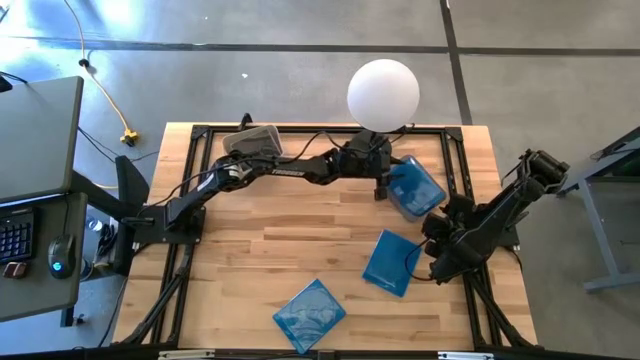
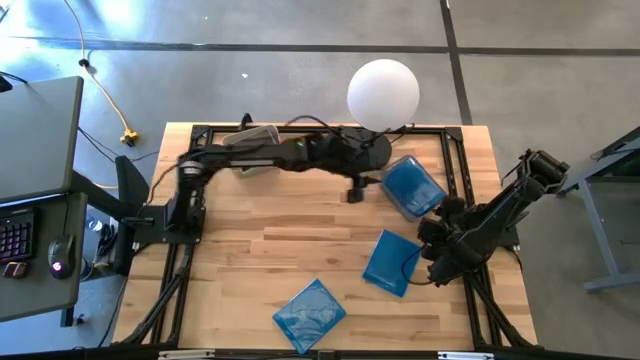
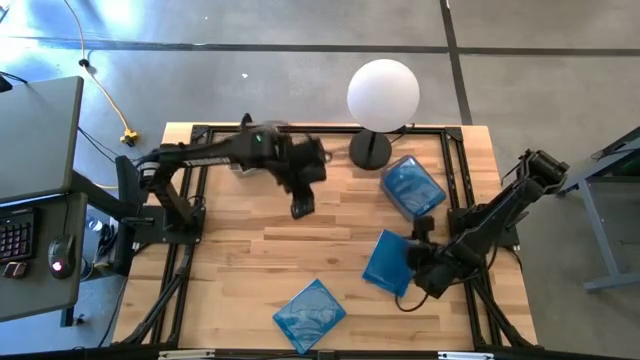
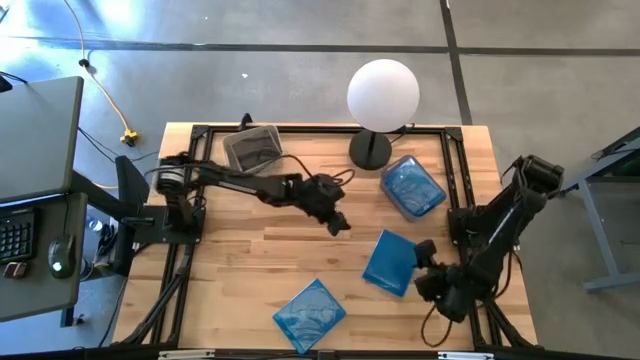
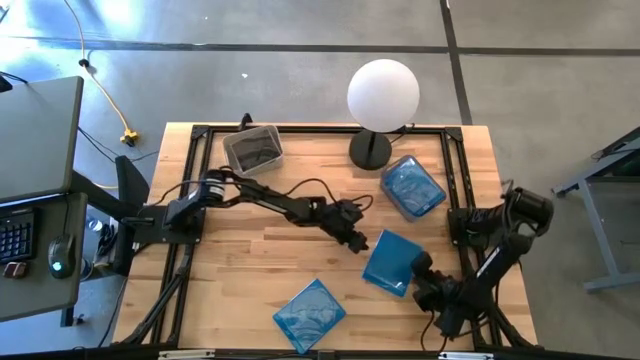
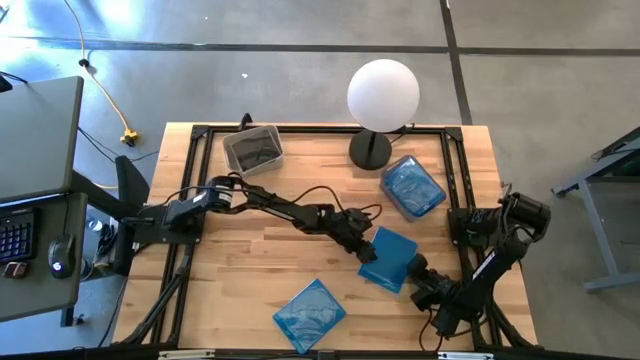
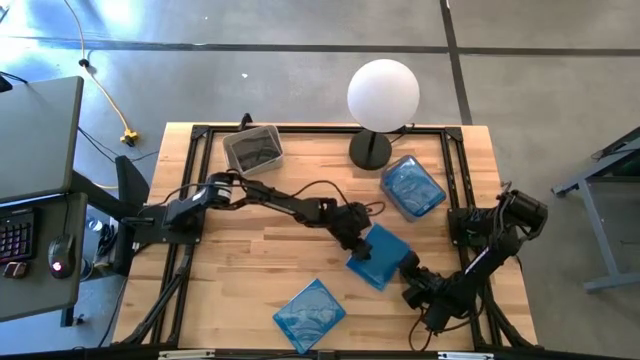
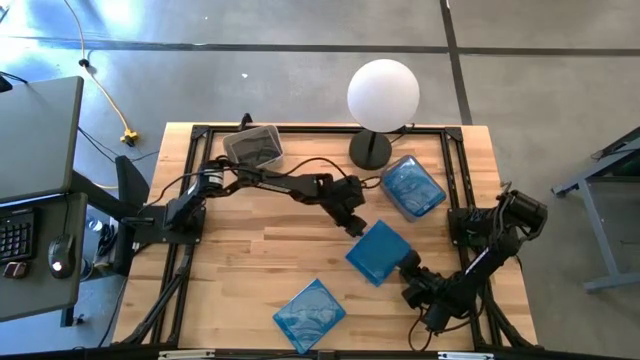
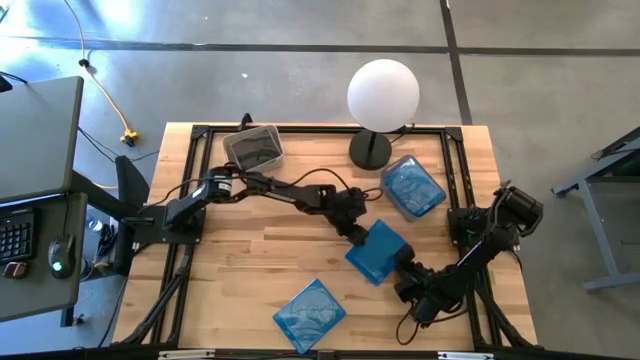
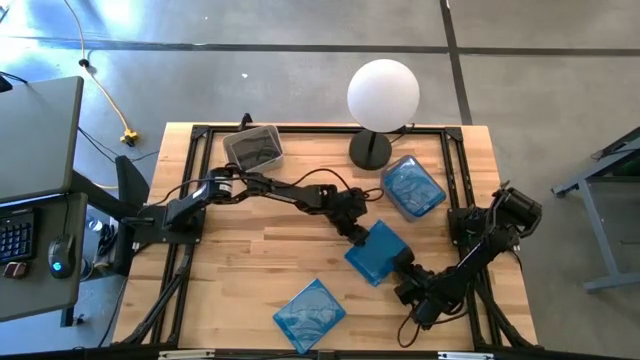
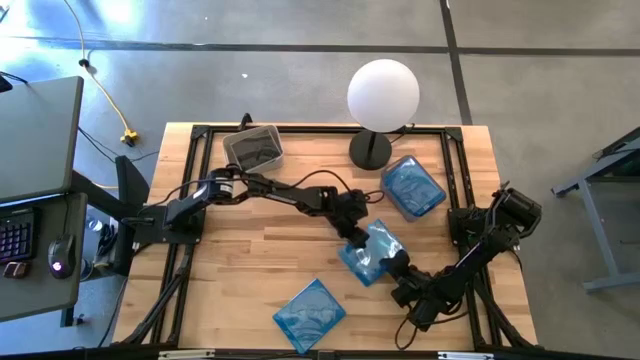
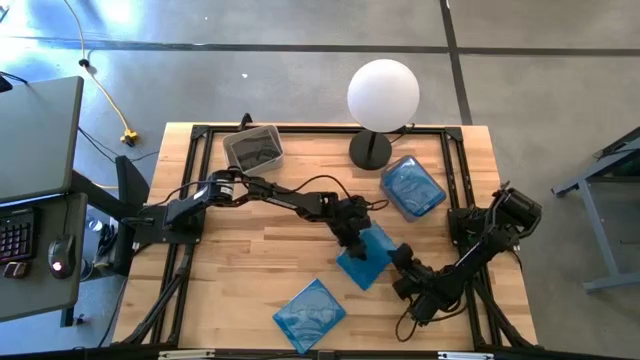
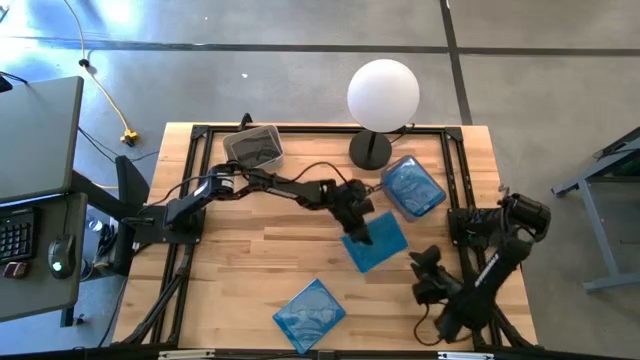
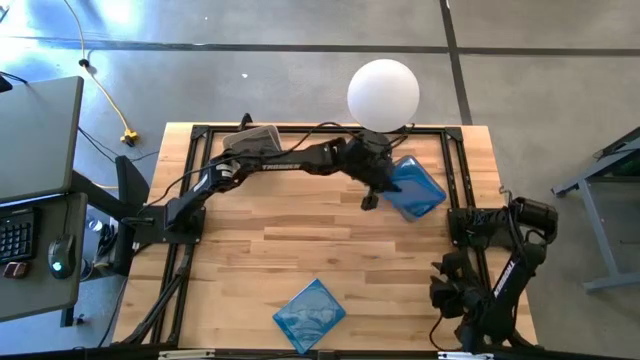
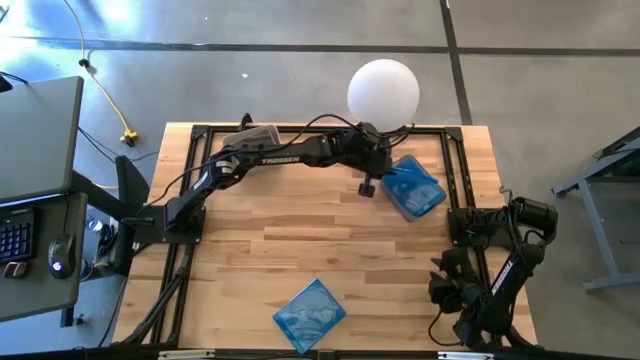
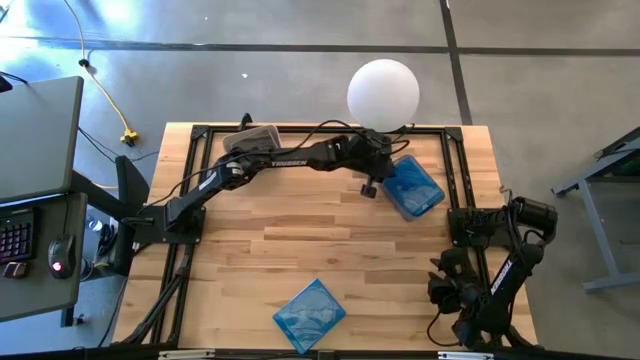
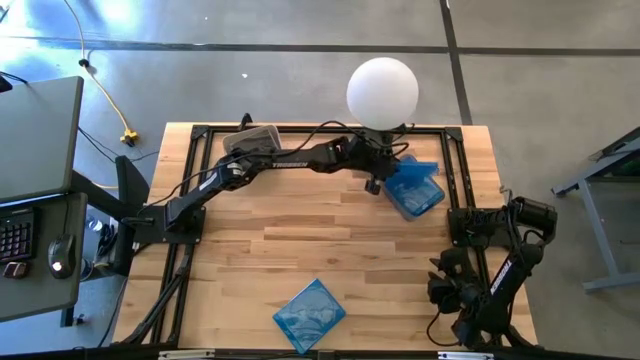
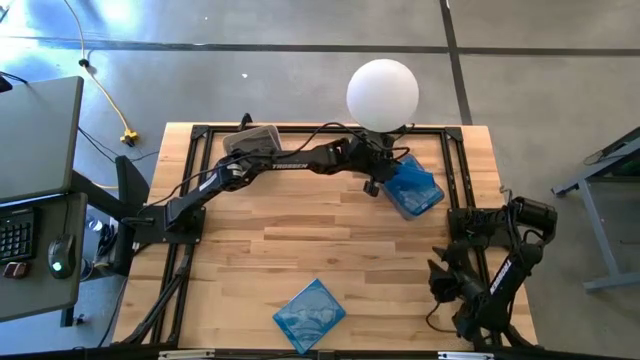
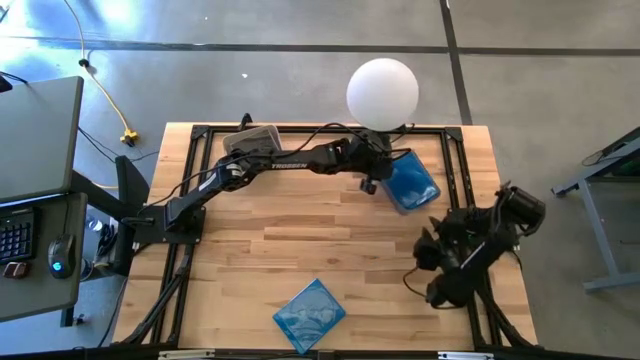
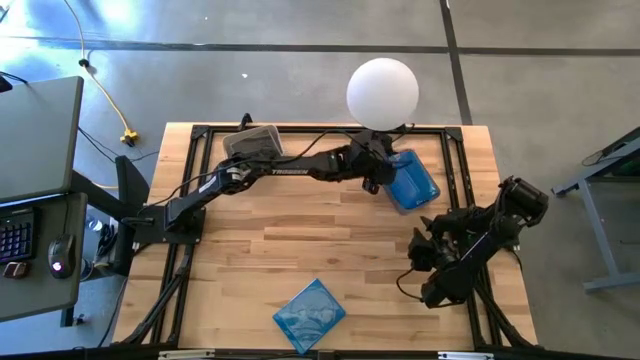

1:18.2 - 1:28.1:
Task: Pick & place jewel cases by type
Put the top blue CD case into the gray bin

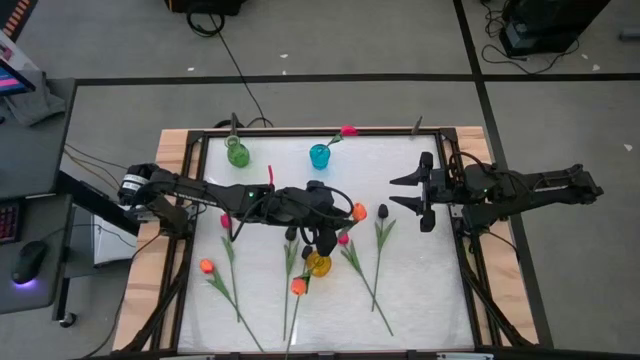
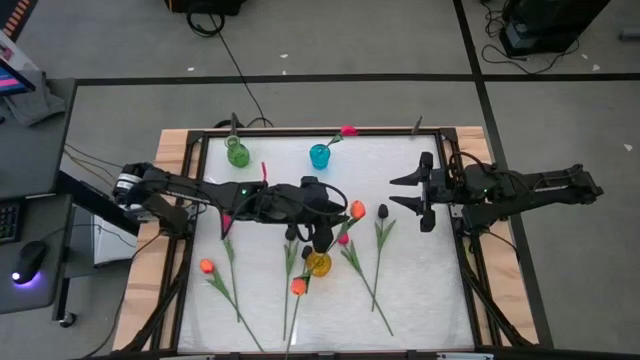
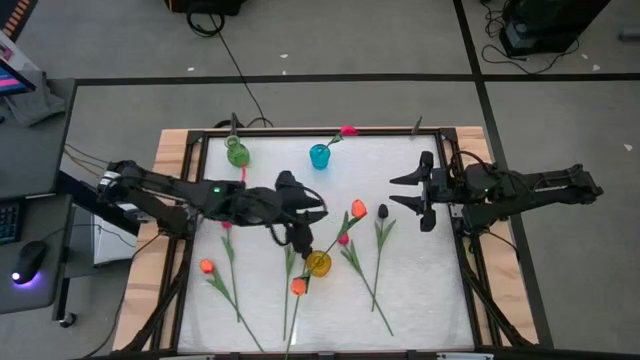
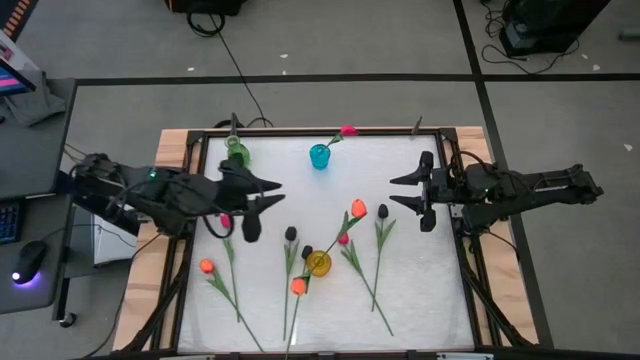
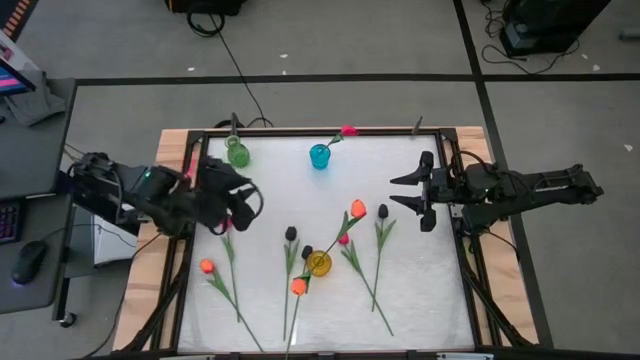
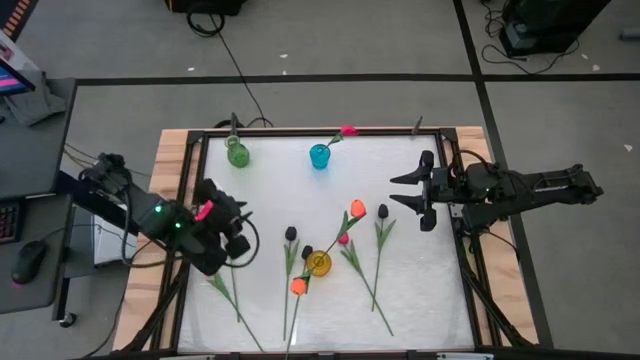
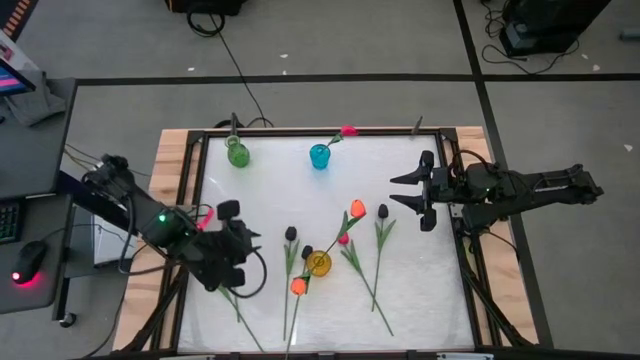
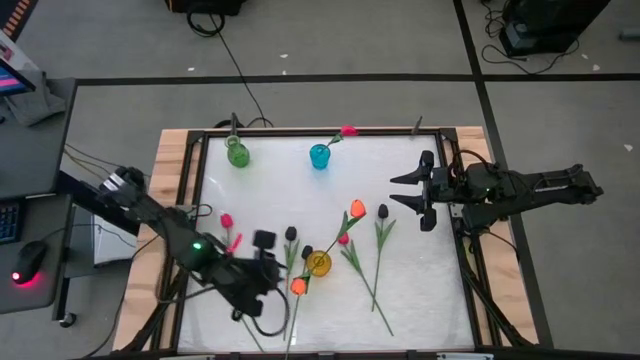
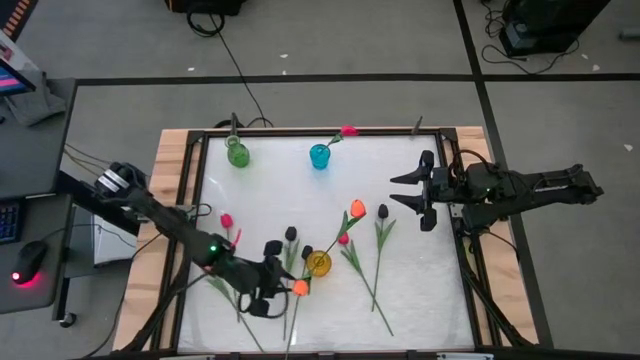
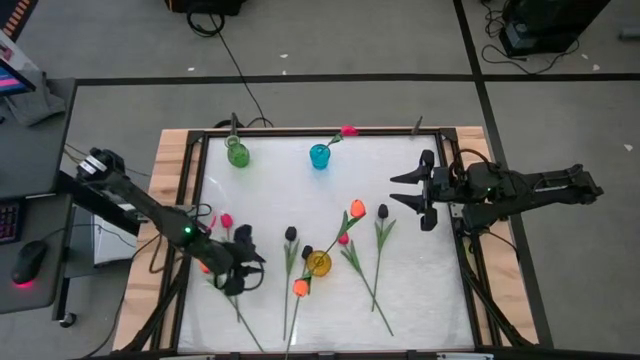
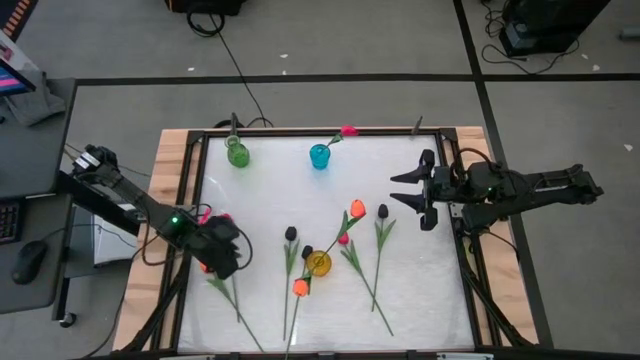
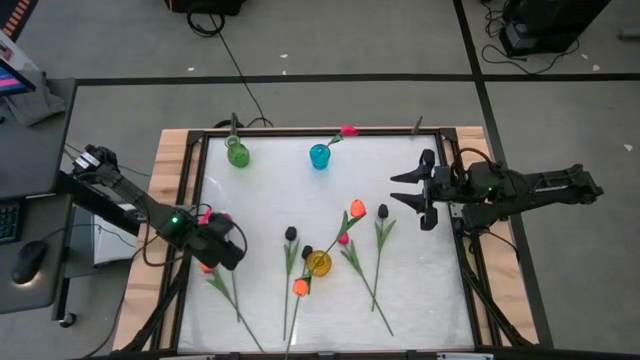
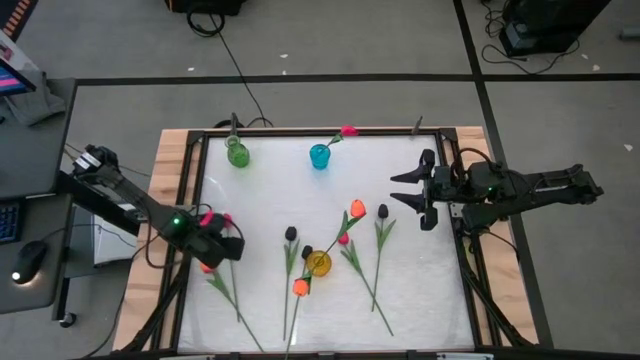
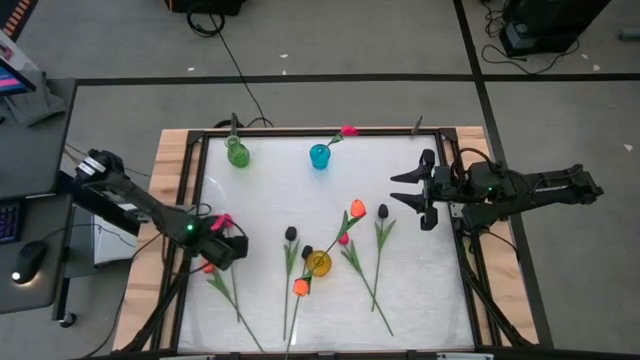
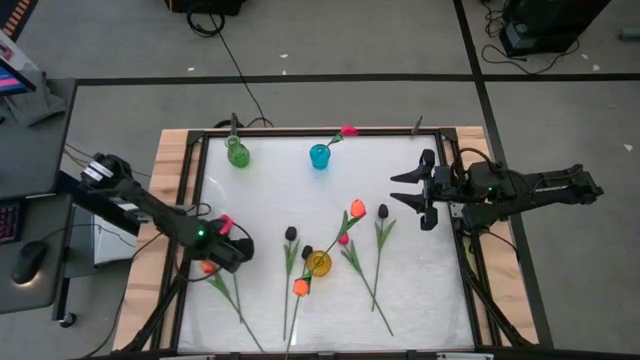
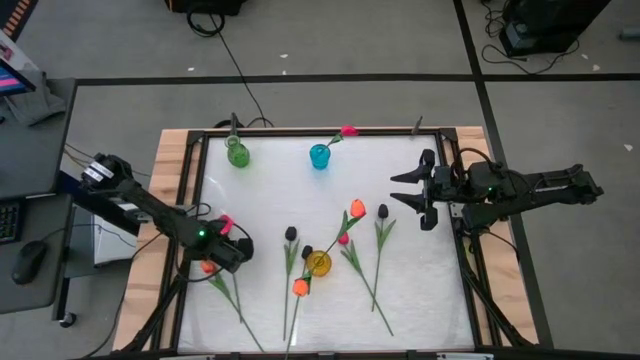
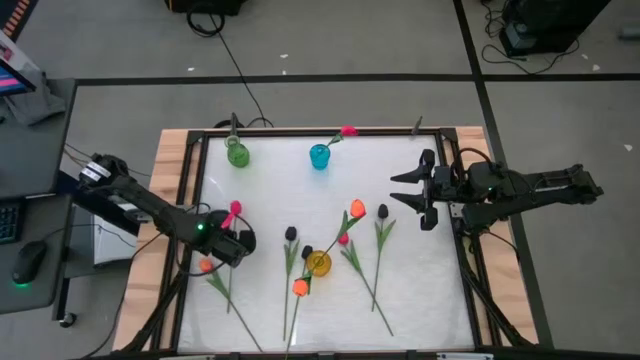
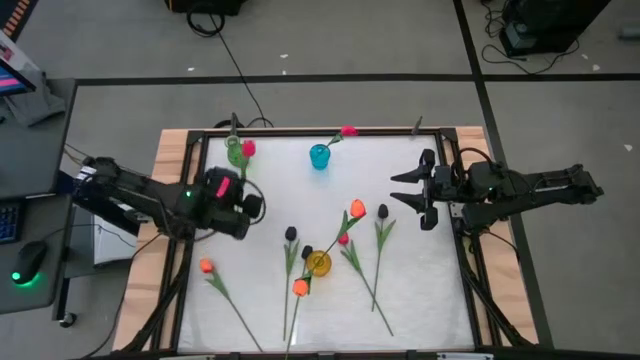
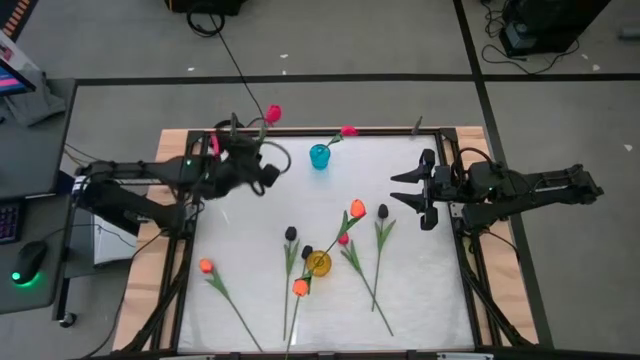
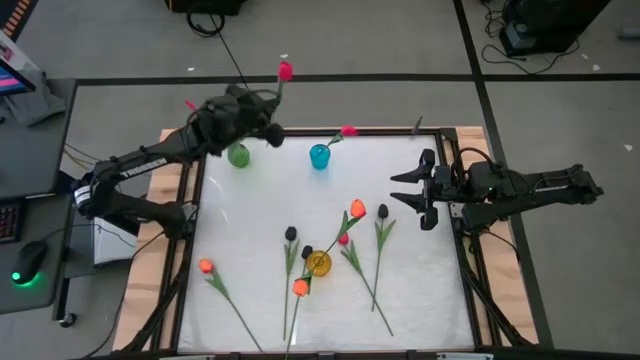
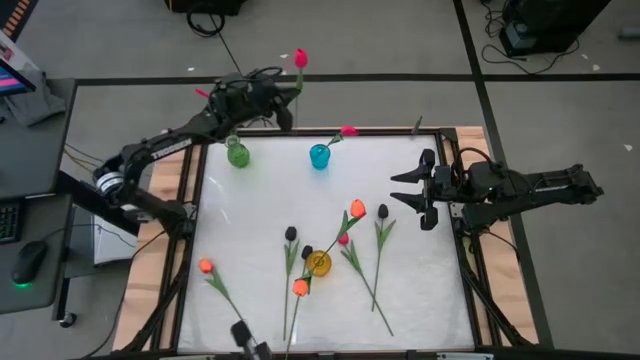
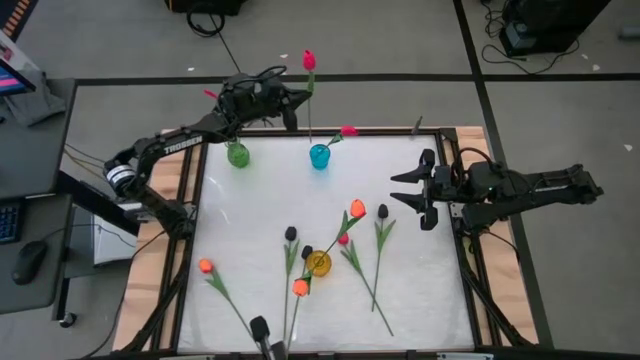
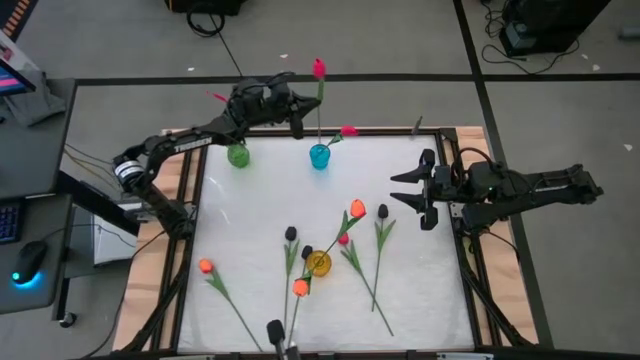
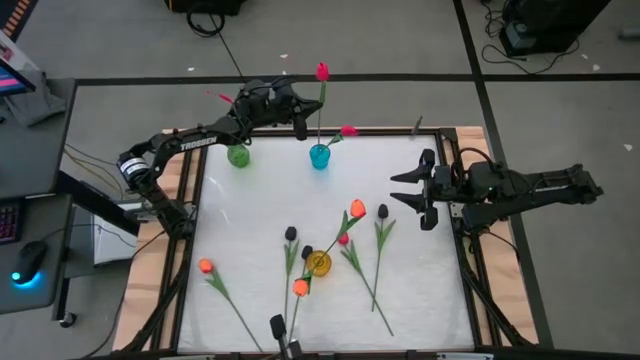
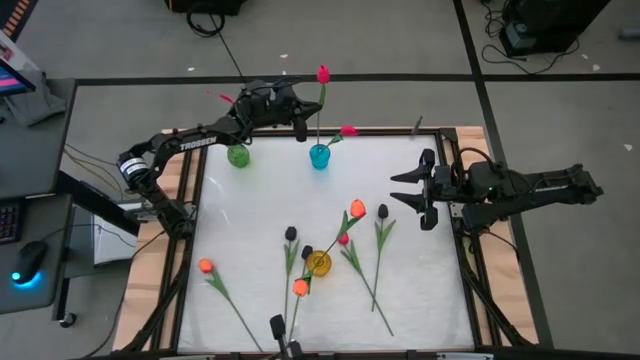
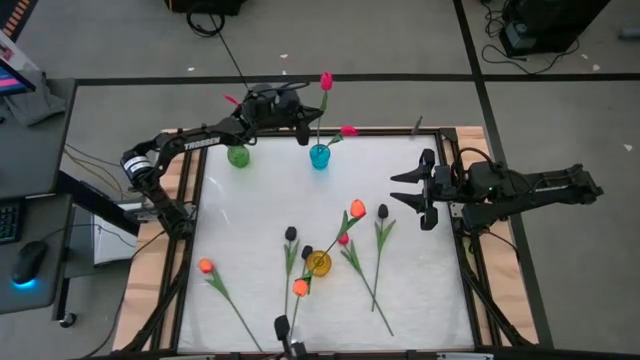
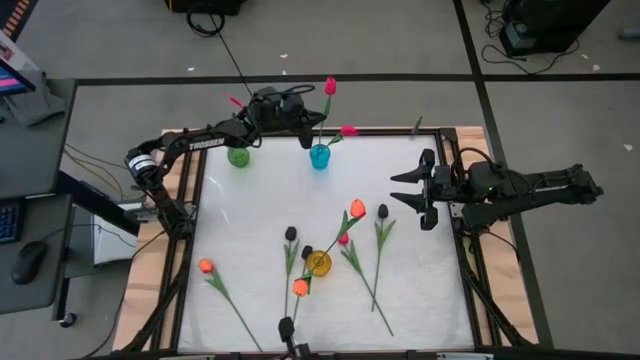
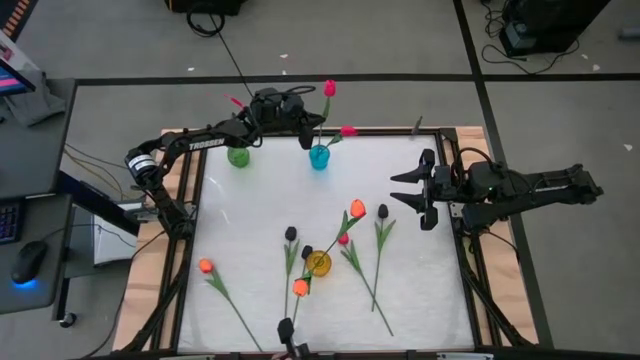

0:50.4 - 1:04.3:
Task: Sort flowers into vase by color
Put the bottom pink flower into the blue vase
